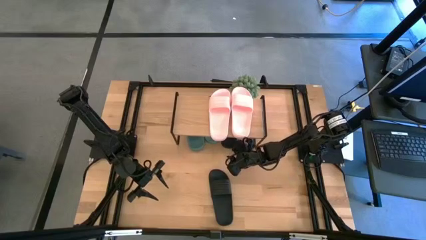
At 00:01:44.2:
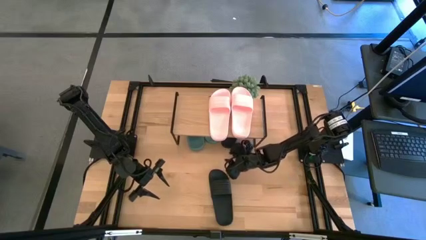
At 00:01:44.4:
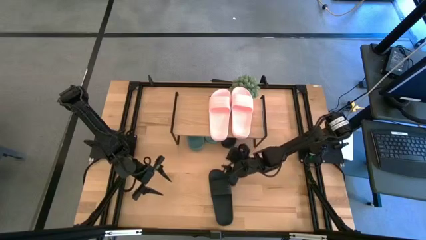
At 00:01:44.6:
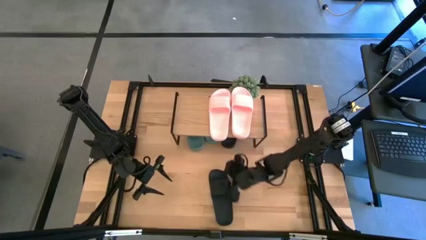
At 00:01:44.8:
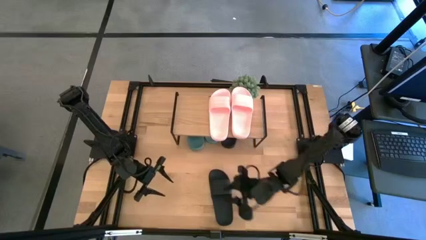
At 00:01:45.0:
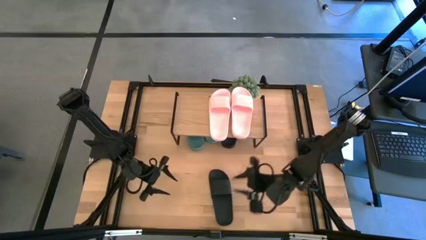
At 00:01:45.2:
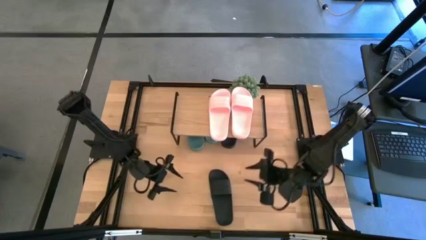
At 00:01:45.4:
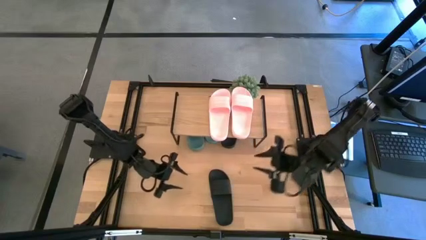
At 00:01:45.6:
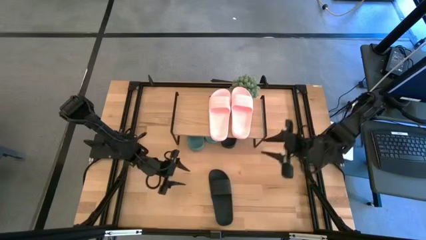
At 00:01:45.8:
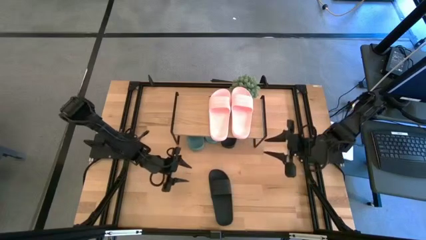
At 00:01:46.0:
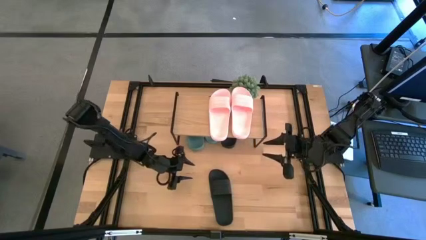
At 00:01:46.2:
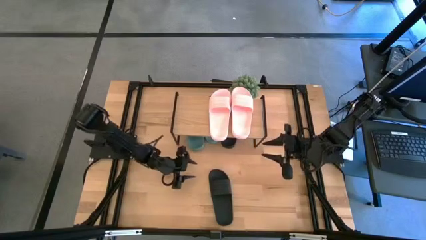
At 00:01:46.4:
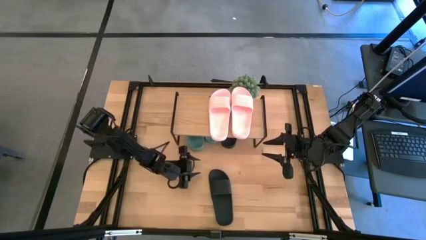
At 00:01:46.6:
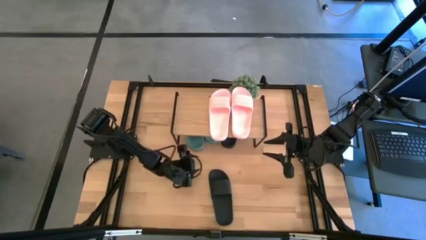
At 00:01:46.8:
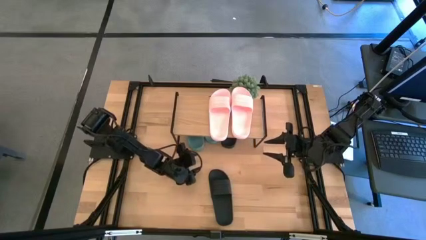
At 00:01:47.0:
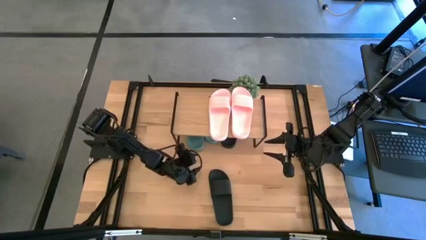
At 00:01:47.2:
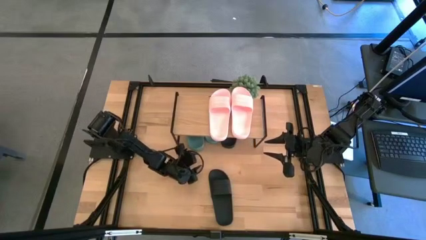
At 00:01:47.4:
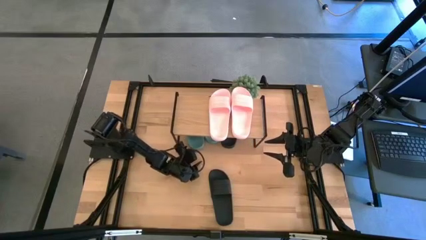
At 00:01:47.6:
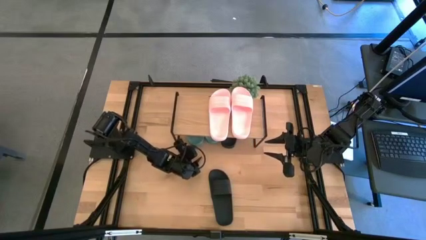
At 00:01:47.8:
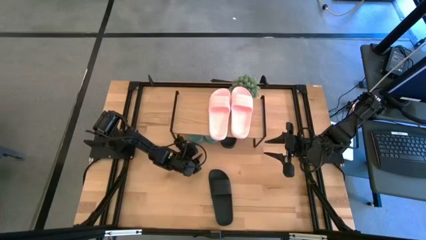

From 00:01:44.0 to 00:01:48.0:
Task: Pick and place slides into the shelf
Adjust the green slide under the shelf

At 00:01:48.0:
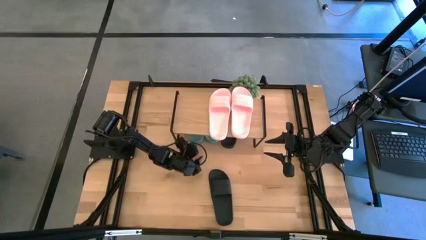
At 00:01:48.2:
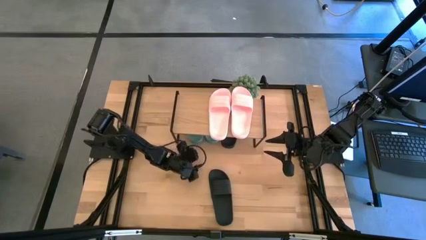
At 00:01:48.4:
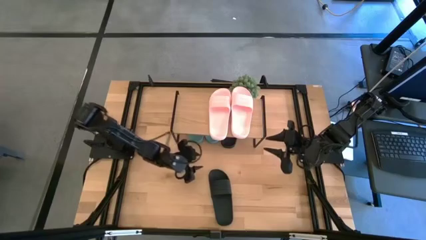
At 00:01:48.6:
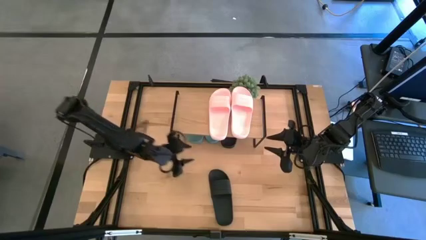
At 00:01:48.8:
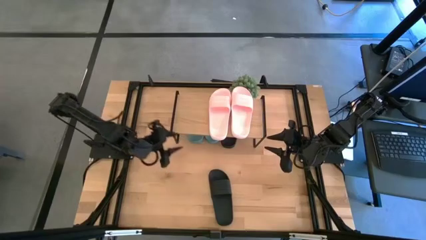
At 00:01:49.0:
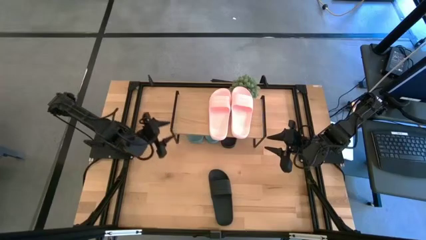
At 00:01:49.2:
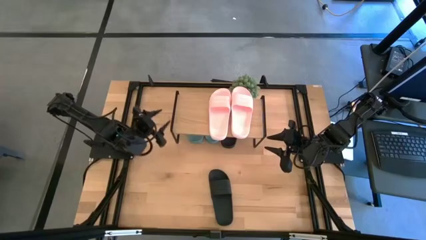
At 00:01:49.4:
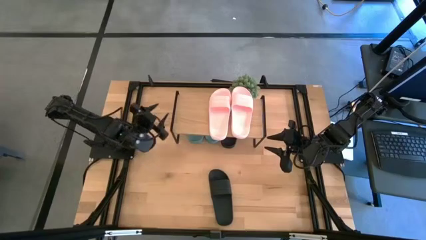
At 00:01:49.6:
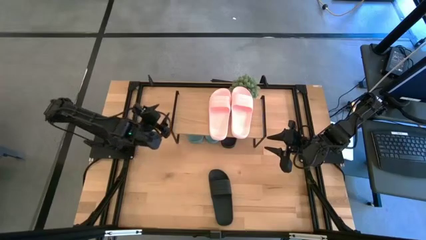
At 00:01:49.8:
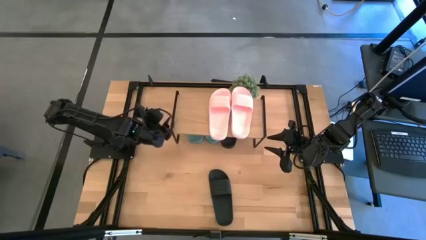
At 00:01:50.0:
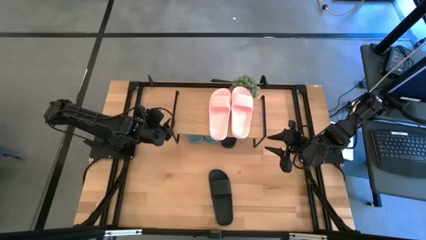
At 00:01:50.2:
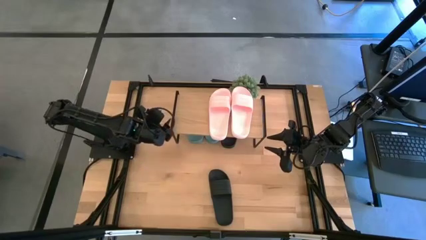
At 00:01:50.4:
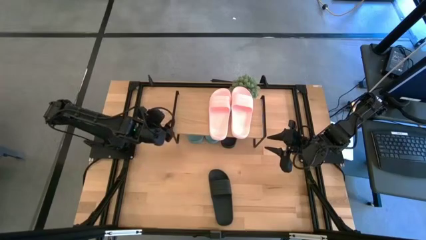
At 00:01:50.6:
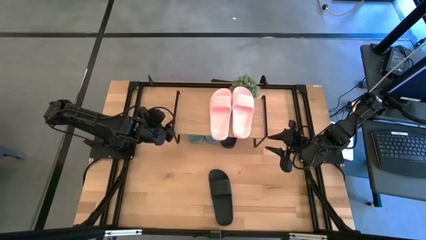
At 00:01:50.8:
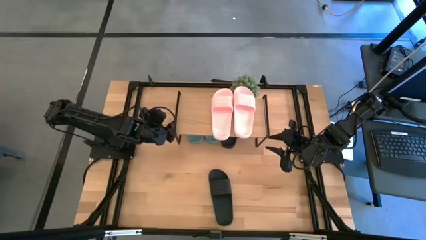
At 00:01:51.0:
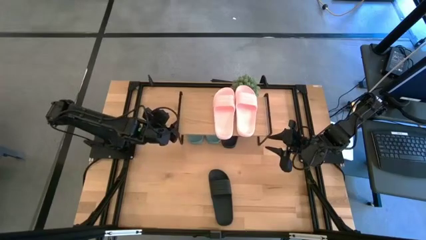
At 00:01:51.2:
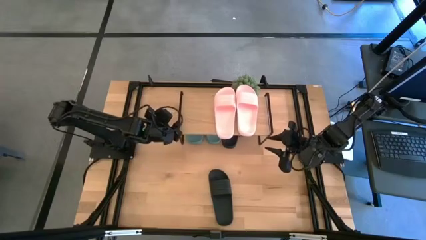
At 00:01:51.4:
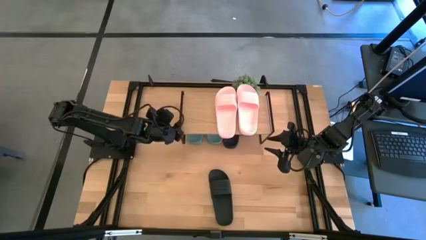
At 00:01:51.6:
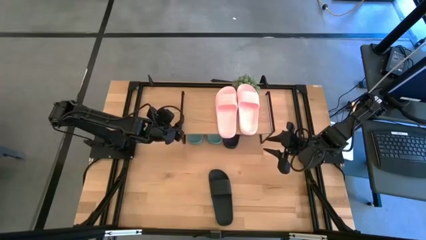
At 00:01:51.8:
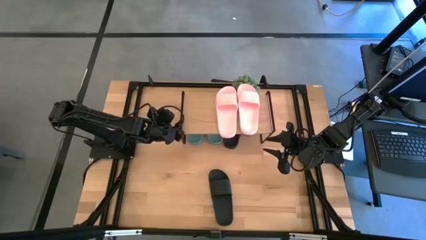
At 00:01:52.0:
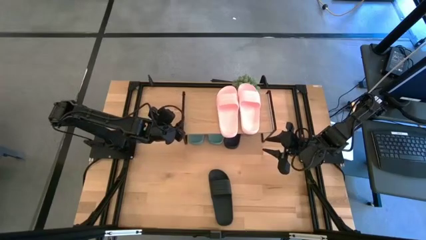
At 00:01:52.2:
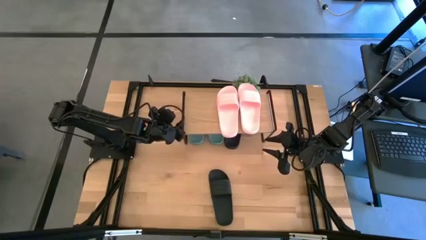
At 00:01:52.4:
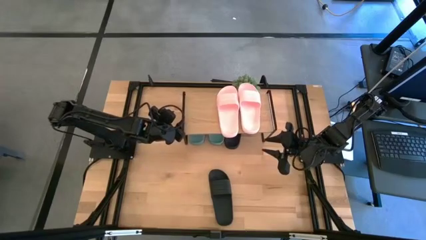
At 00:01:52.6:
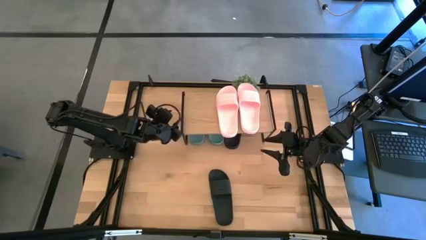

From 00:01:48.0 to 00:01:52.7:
Adjust the shelf

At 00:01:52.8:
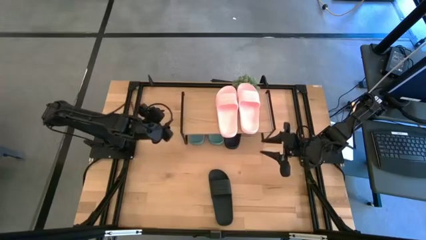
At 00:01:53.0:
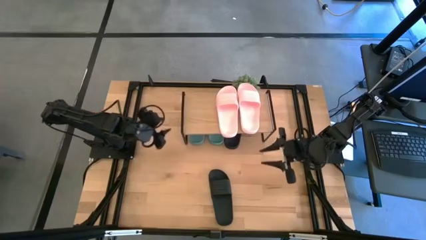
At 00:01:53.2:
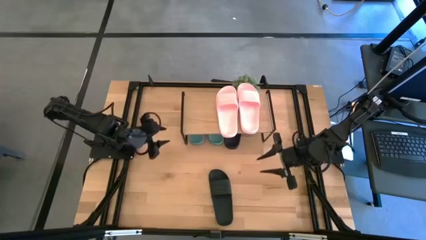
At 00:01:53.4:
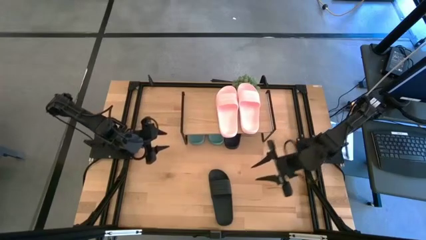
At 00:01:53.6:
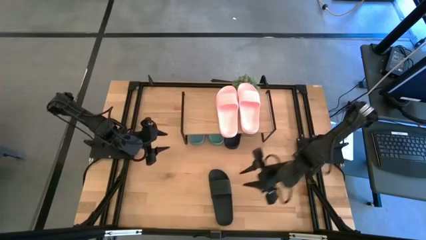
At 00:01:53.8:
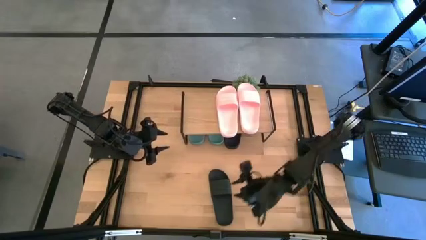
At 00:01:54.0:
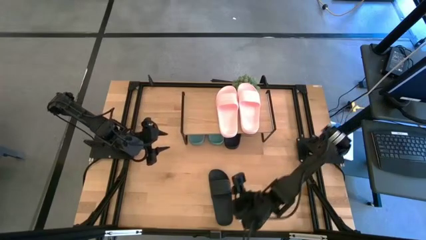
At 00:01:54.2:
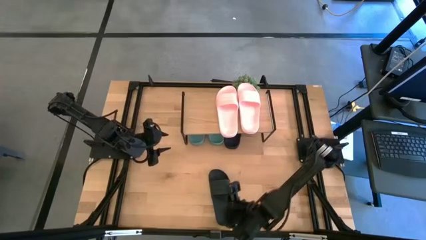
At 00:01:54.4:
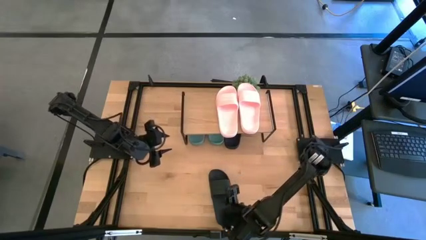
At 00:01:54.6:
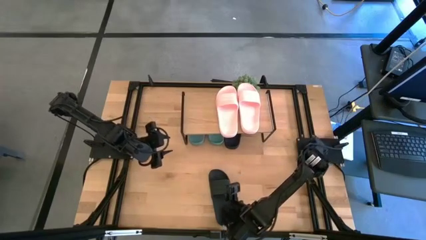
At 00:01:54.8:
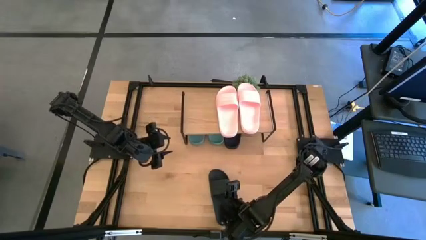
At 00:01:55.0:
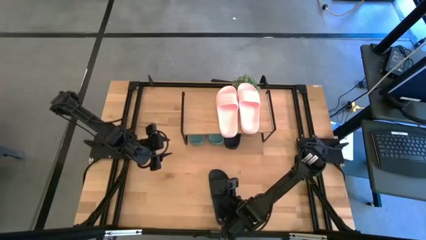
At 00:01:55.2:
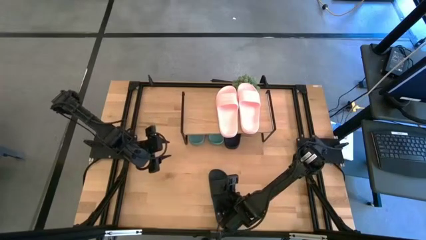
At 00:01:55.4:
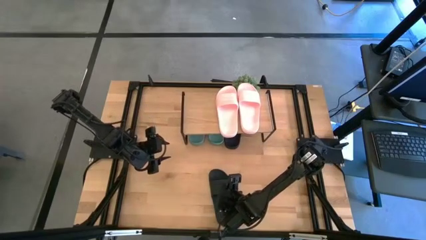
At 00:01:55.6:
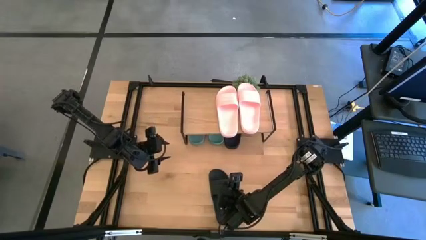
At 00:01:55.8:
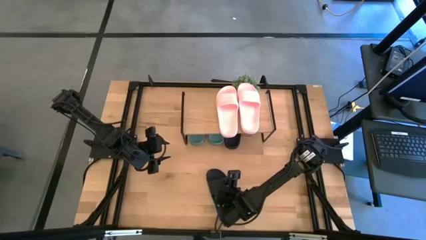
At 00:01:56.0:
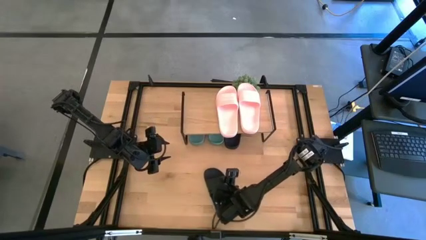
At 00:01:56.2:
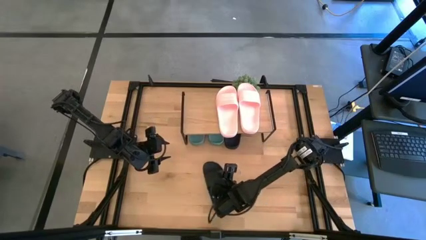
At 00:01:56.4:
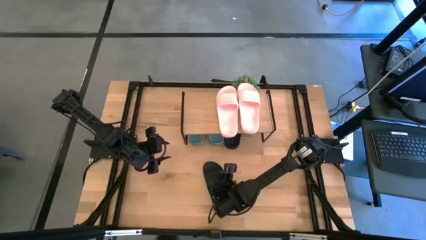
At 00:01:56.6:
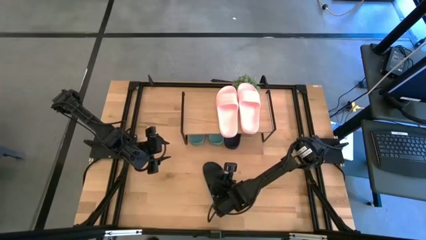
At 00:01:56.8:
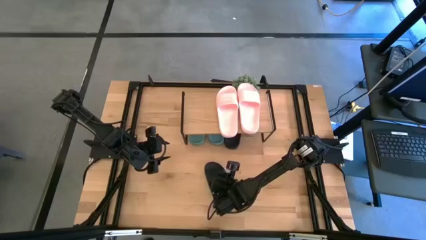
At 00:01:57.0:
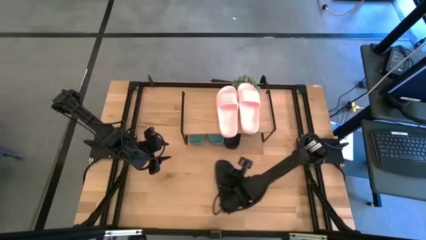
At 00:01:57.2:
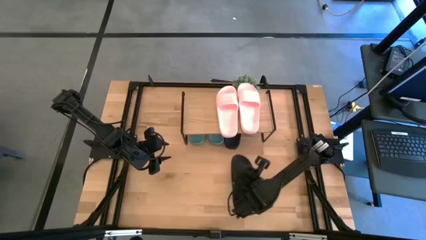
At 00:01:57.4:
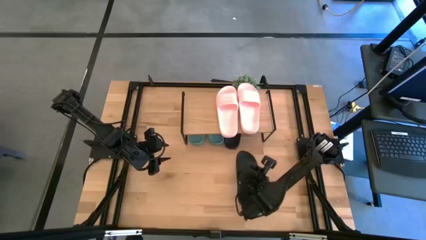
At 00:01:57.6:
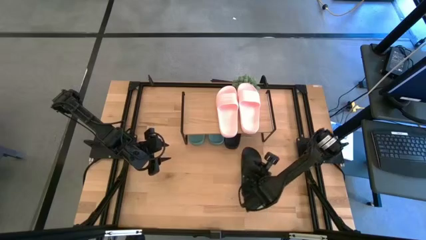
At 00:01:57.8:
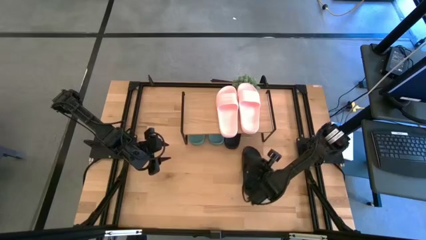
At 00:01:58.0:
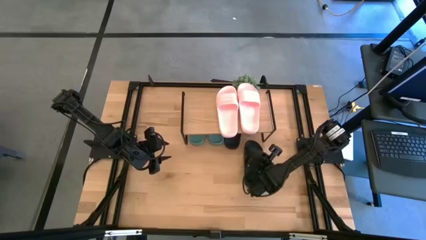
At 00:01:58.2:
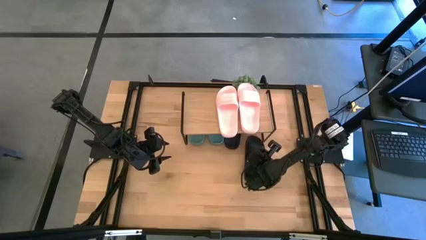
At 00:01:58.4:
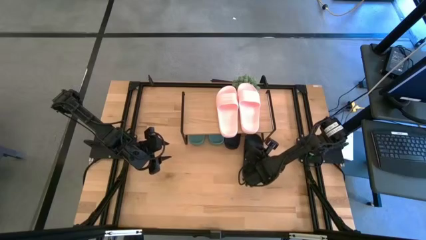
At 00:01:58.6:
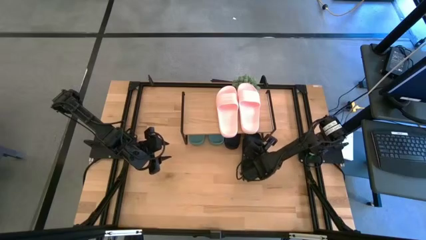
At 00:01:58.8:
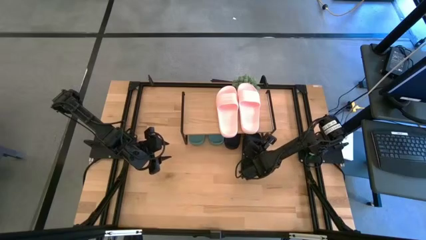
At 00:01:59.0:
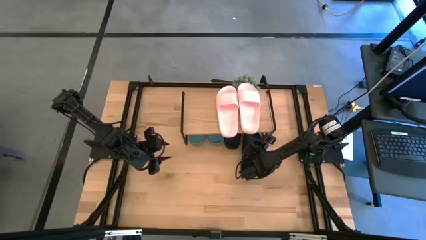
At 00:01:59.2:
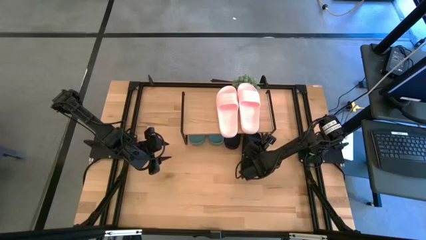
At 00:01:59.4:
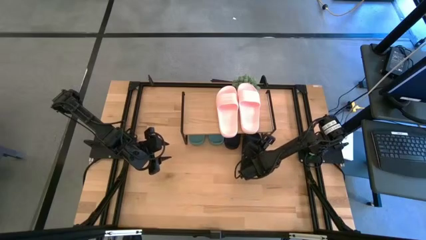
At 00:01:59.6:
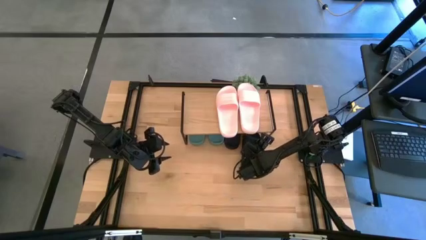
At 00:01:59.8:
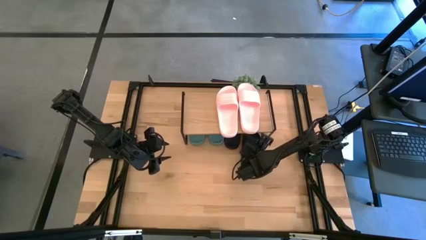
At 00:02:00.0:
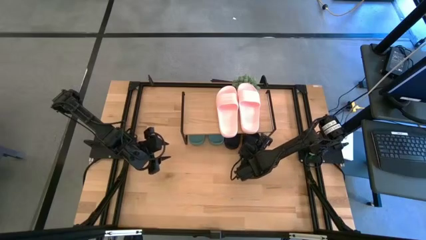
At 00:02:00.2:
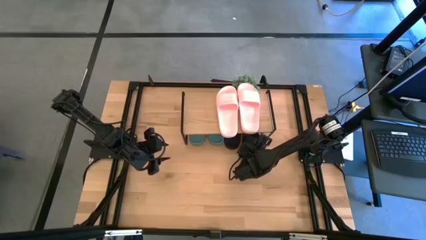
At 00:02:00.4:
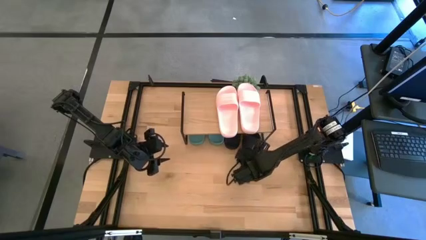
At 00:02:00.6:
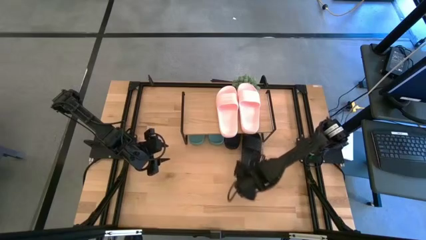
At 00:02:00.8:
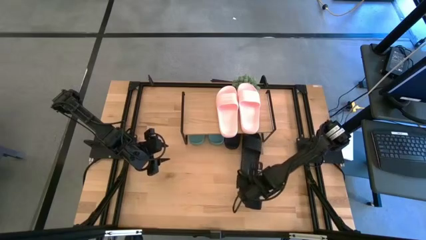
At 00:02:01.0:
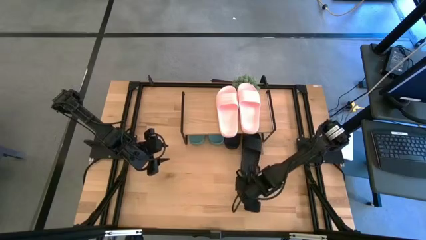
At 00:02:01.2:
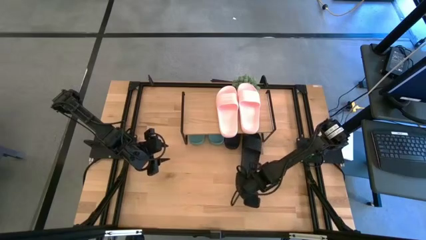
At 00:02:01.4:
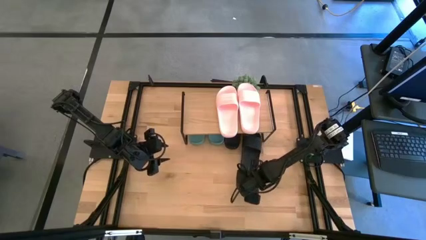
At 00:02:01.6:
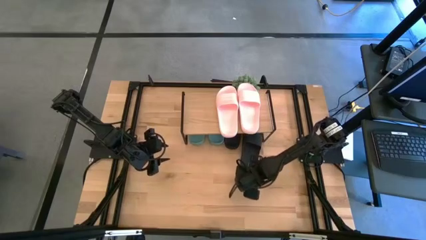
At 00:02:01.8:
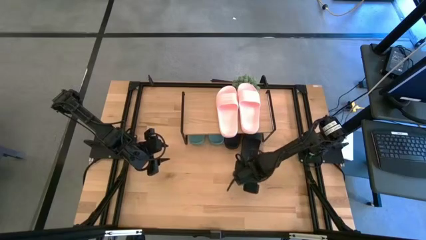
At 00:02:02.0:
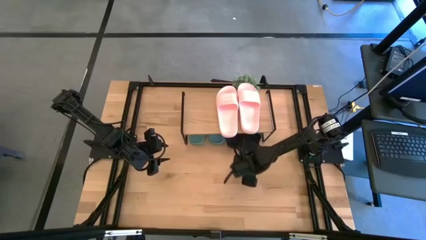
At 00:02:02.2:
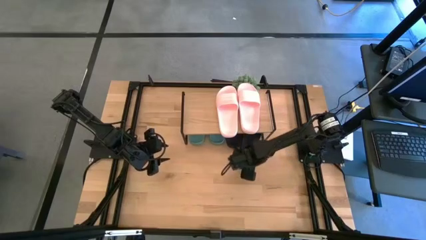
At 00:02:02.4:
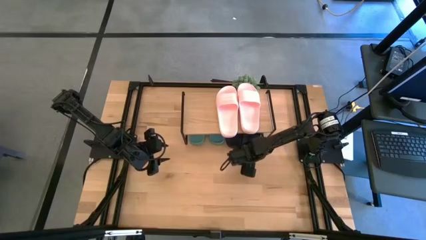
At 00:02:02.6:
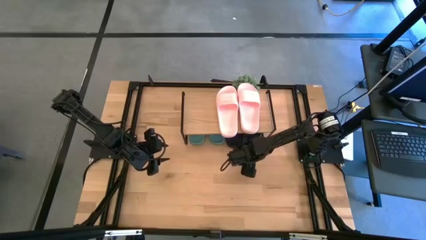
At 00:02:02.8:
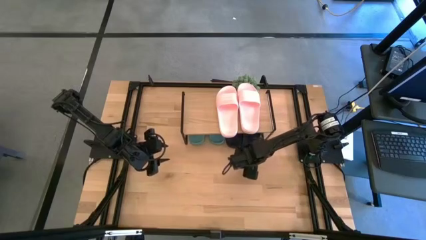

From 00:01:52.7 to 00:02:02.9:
Put the black slide under the shelf
